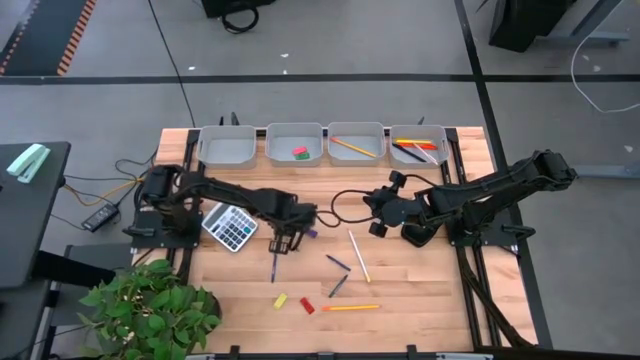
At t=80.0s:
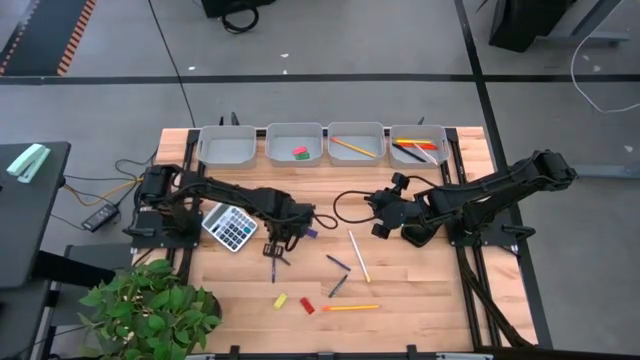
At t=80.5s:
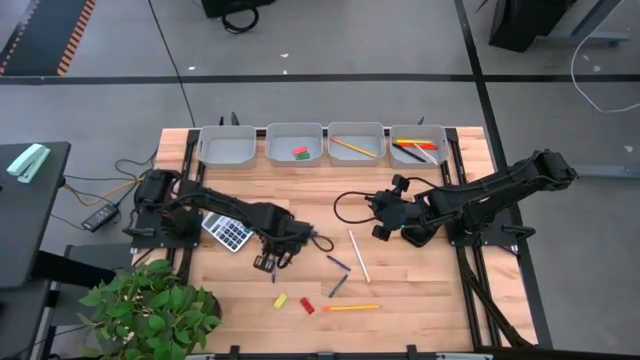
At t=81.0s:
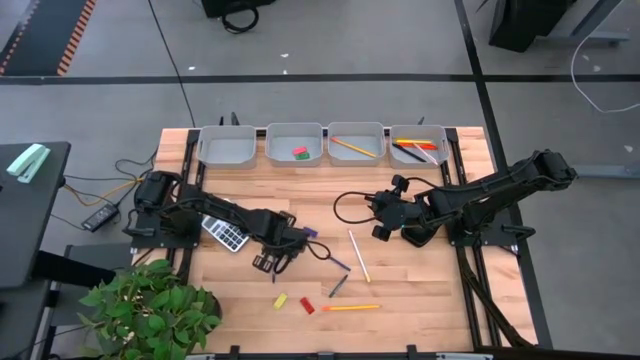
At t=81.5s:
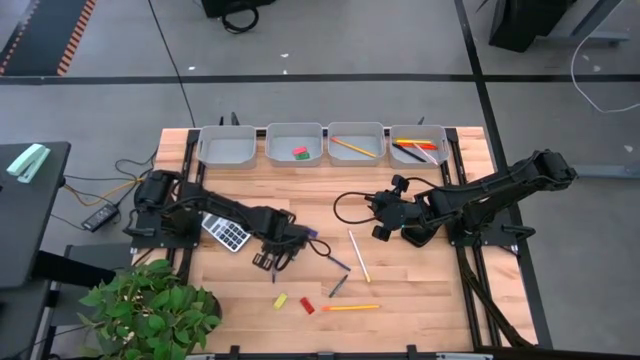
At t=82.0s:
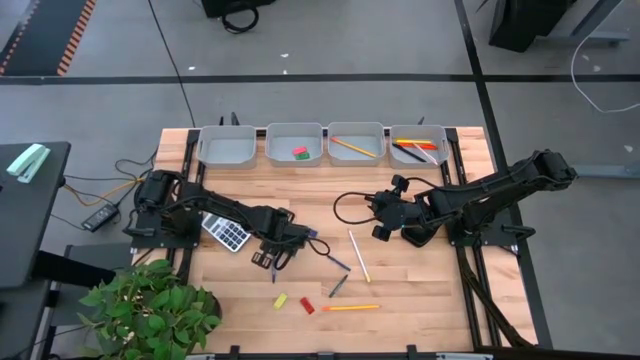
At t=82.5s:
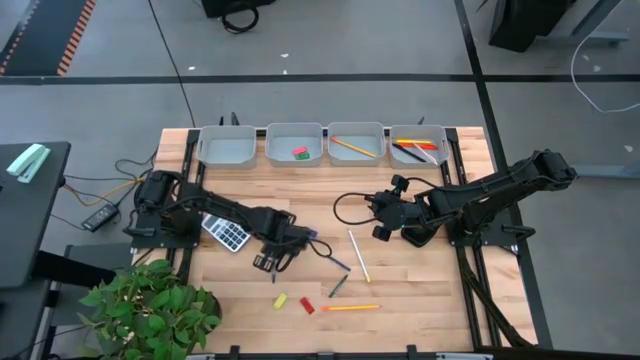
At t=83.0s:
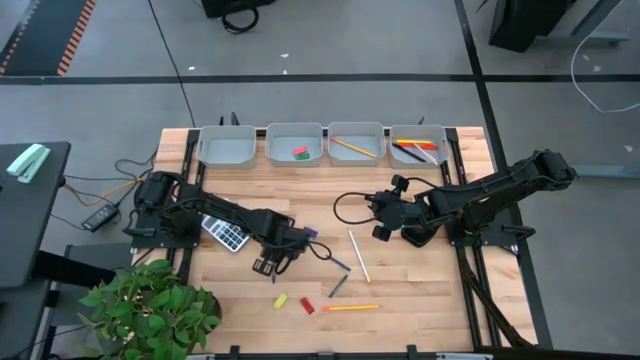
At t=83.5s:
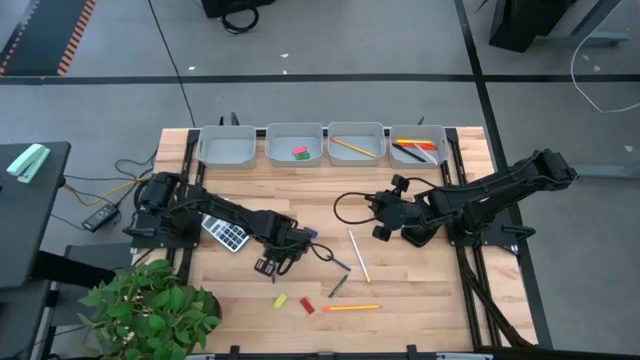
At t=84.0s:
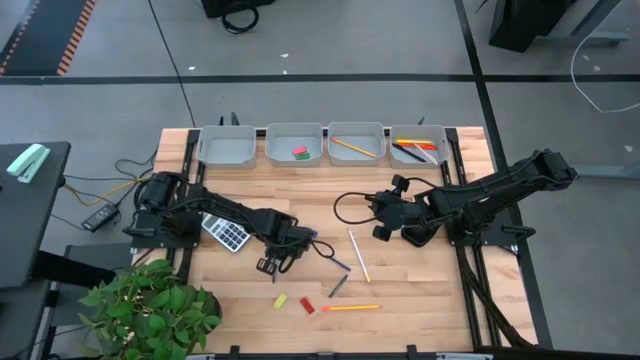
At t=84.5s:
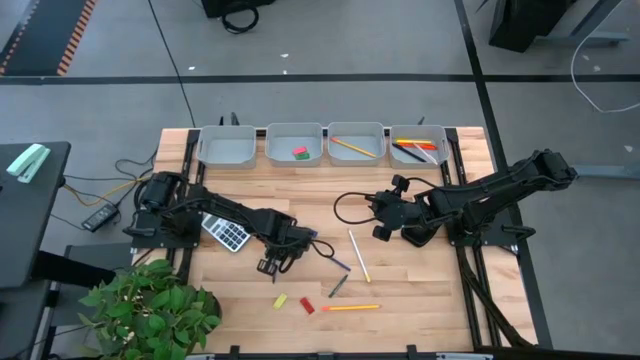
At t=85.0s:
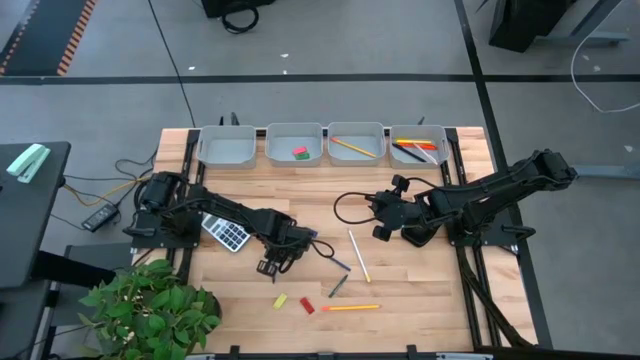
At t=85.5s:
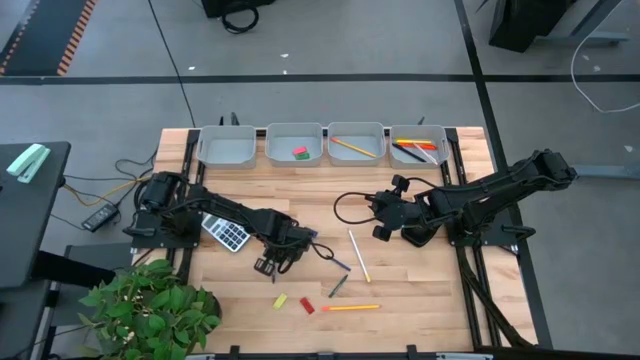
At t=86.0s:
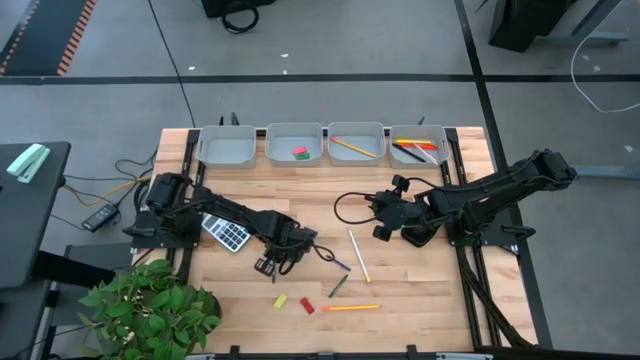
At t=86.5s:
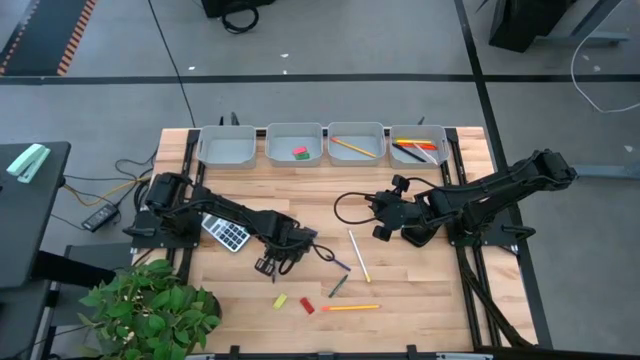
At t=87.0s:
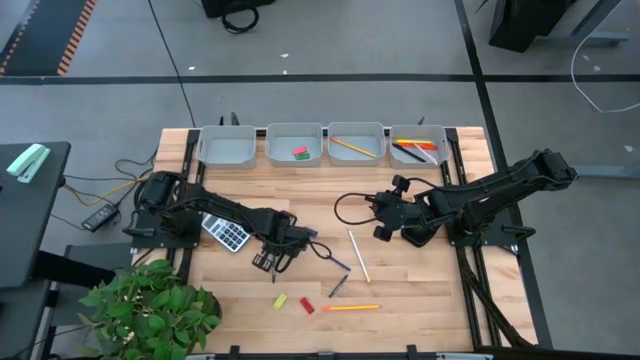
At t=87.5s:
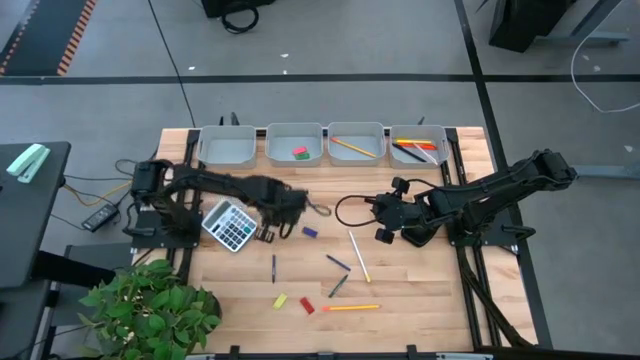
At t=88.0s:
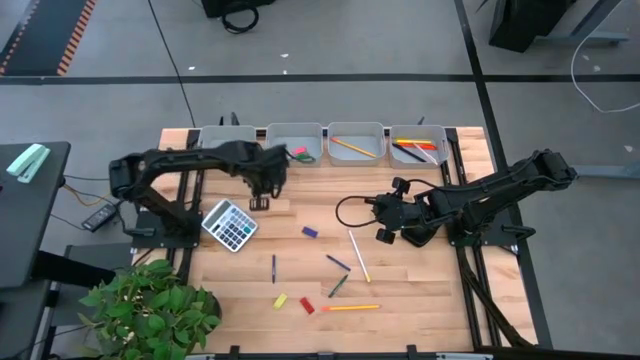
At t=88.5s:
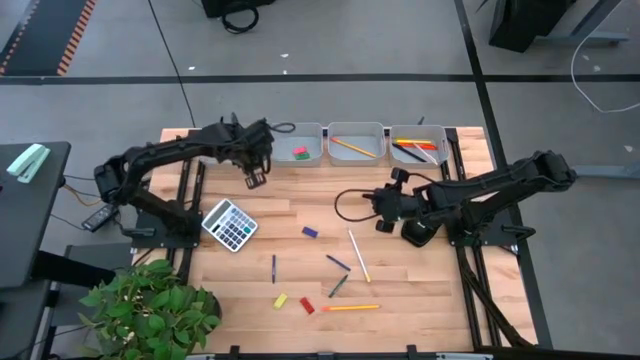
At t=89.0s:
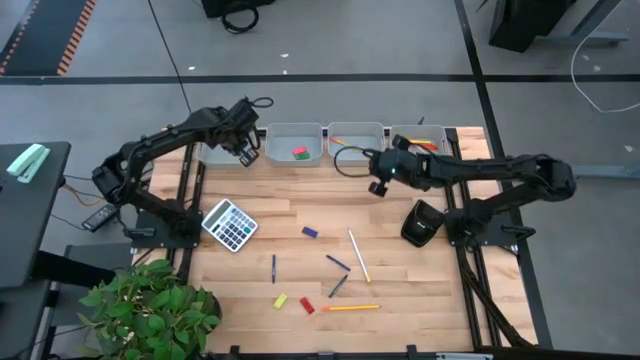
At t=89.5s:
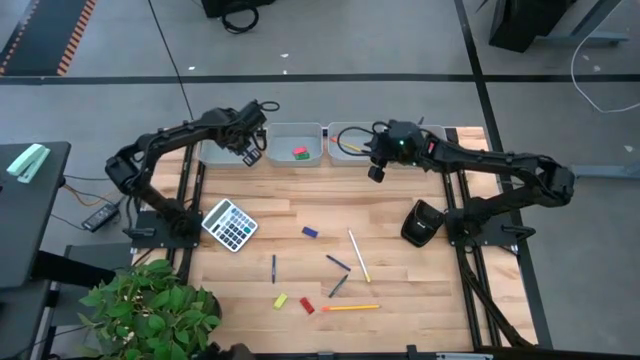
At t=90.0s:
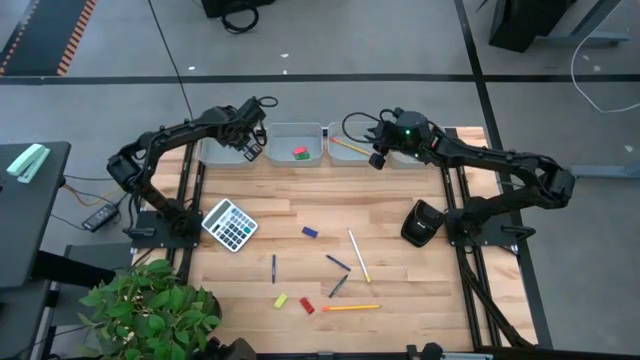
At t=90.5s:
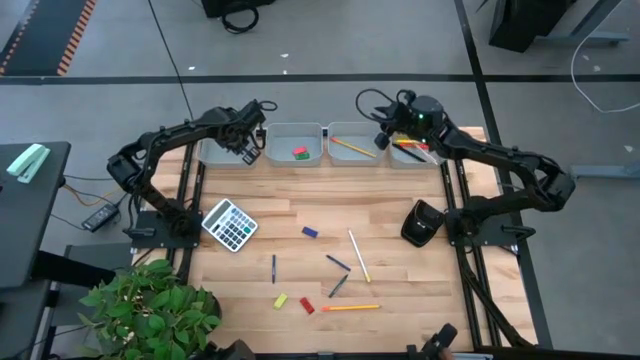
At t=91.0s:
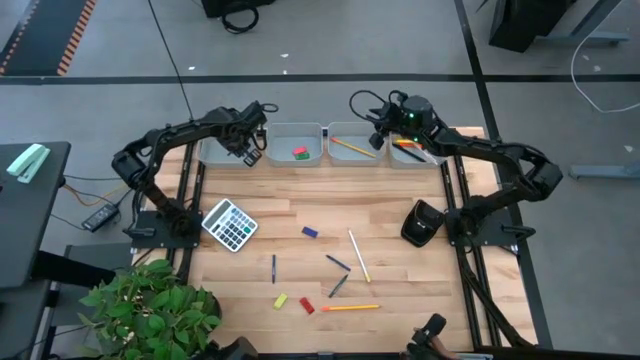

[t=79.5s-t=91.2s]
Task: Sort crayons/erasers/pens/pencils in bins
Put the top green crayon into the gray bin

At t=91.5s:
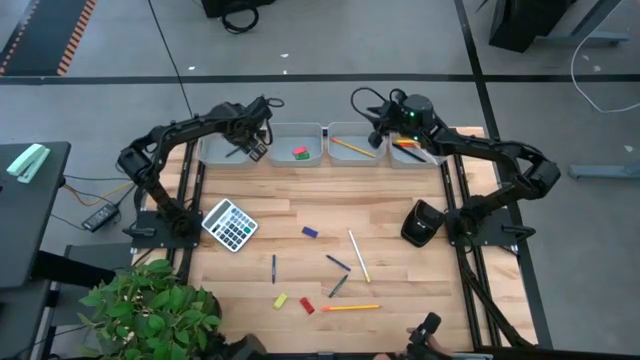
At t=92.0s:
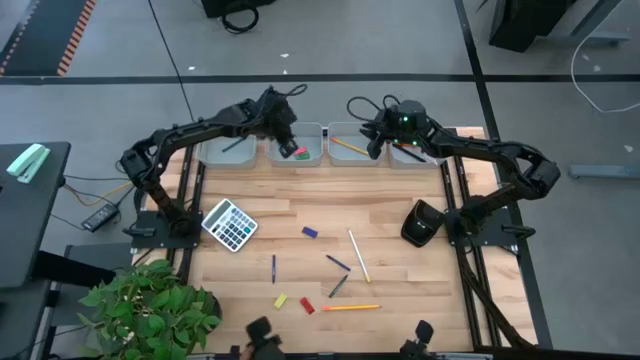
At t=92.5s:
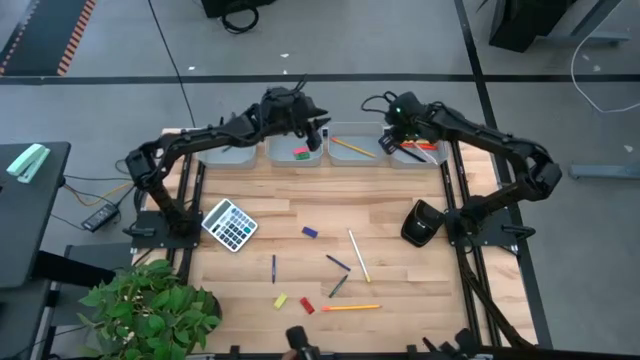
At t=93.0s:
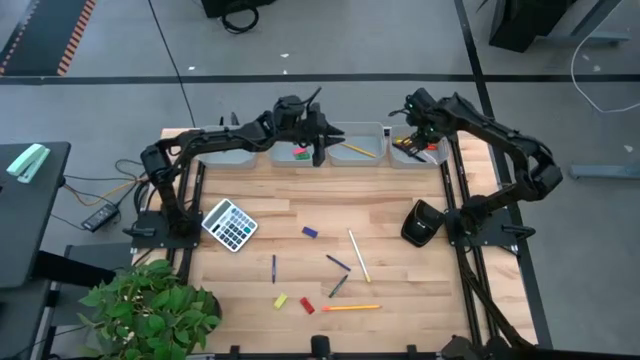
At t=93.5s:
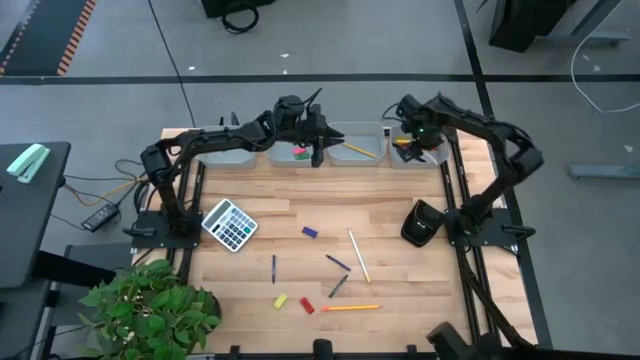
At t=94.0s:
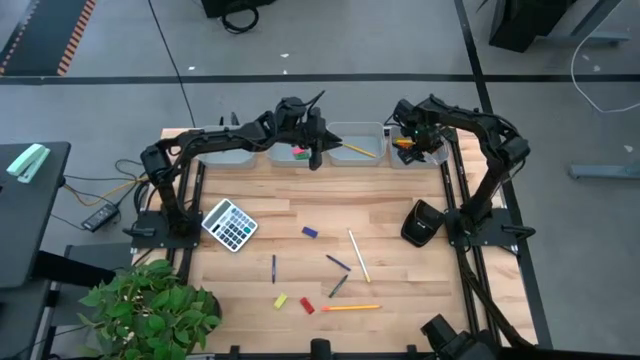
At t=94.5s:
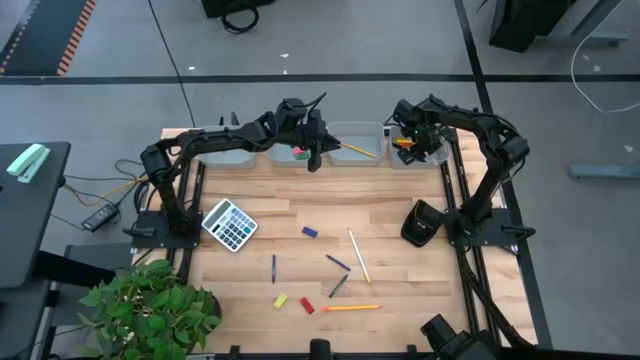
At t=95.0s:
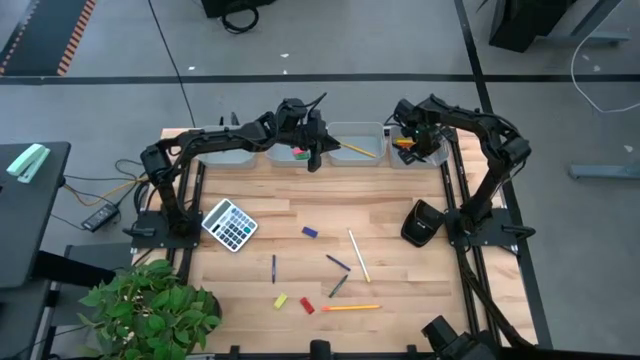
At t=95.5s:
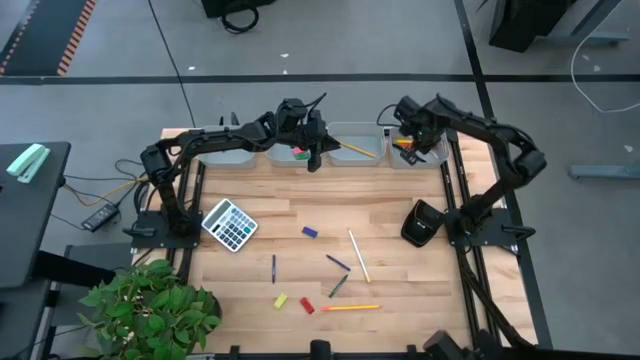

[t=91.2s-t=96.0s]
Adjust the pink pen in the gray bin

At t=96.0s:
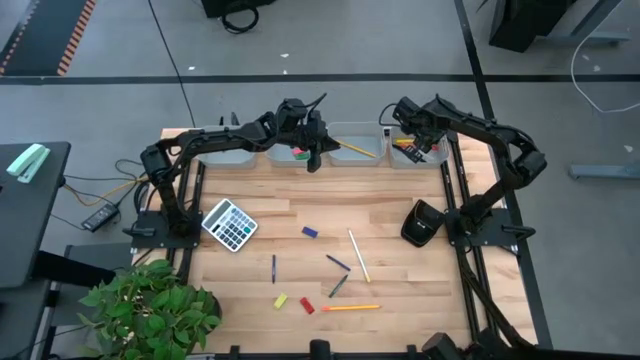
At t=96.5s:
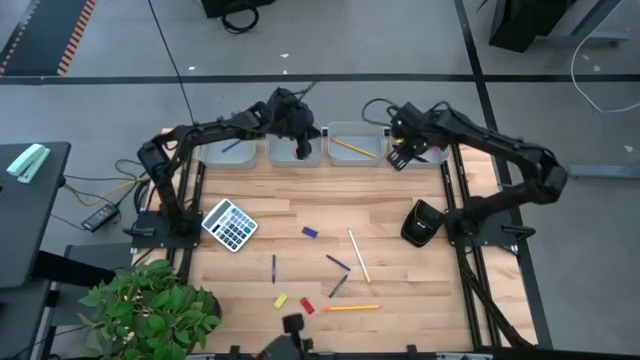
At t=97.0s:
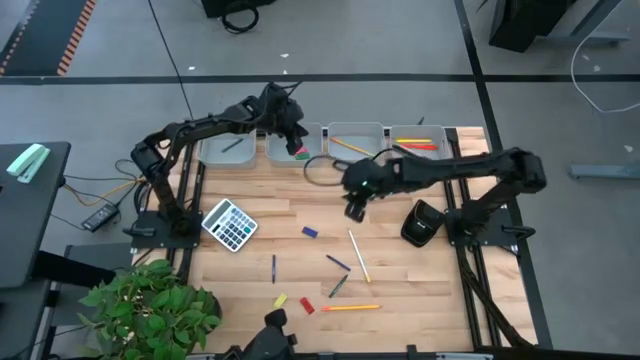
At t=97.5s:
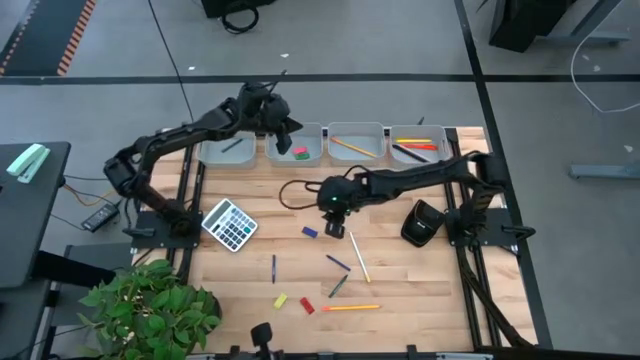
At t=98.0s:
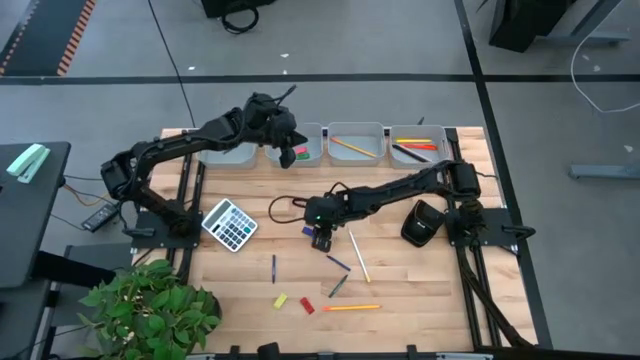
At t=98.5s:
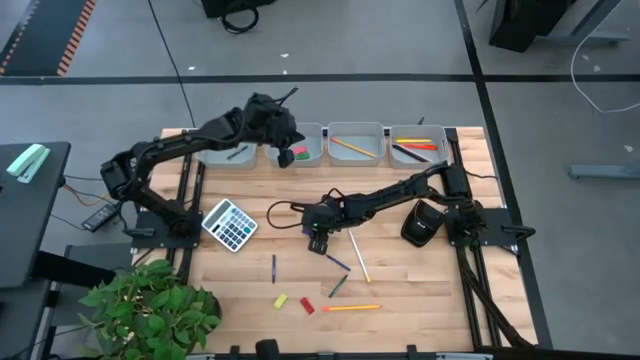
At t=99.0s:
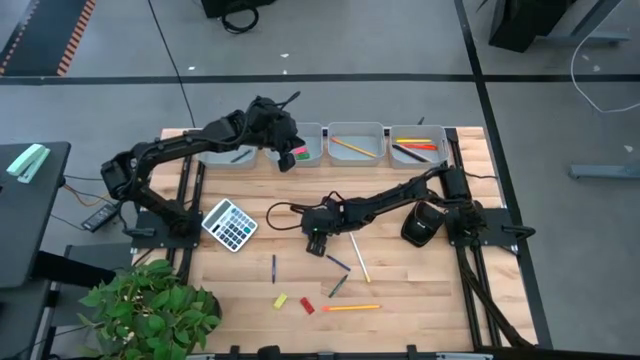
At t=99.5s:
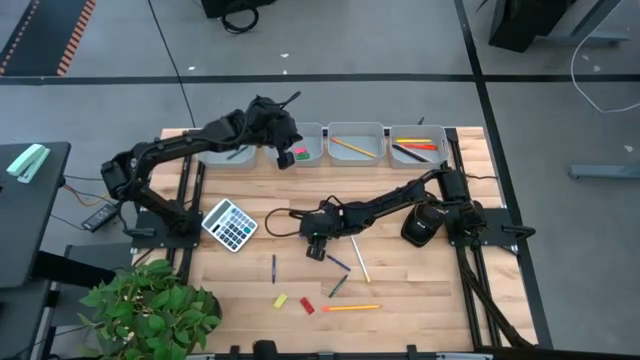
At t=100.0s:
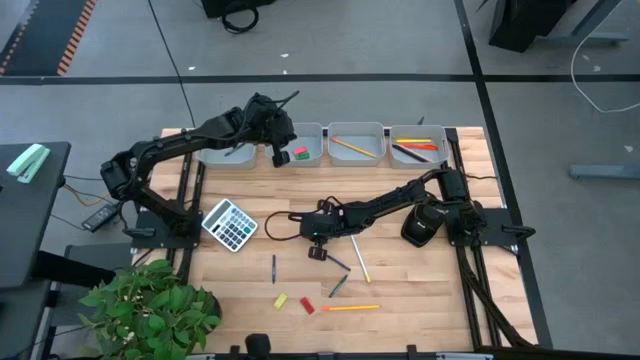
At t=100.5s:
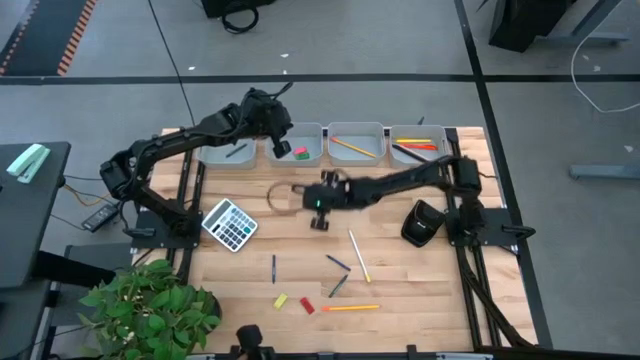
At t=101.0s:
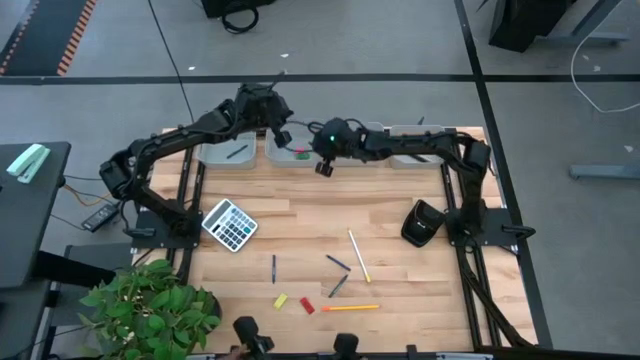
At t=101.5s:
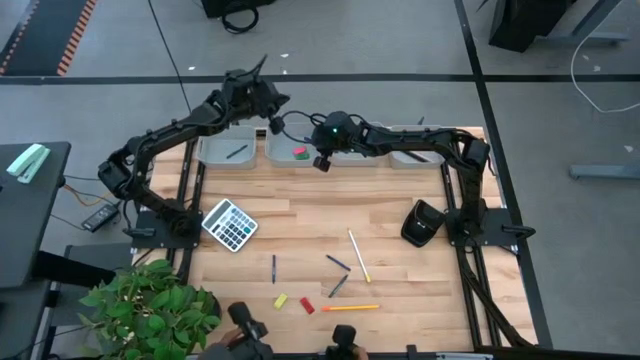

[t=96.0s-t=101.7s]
Put the blue eraser into the gray bin
